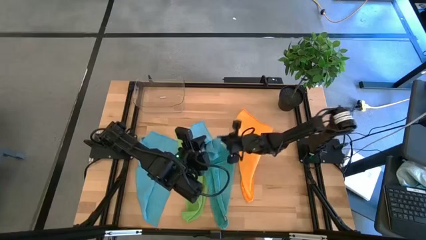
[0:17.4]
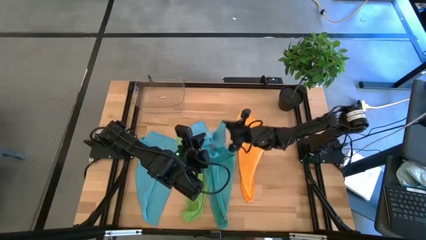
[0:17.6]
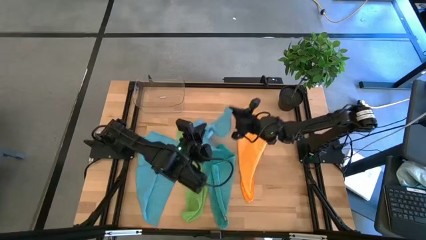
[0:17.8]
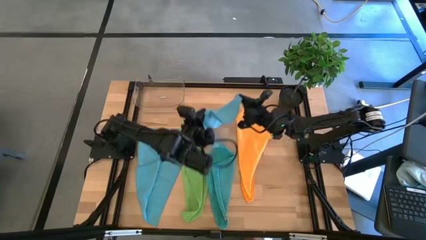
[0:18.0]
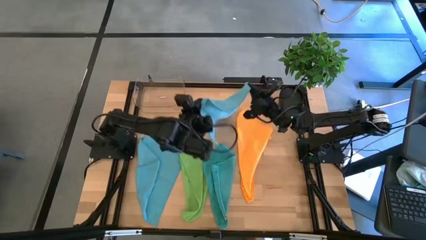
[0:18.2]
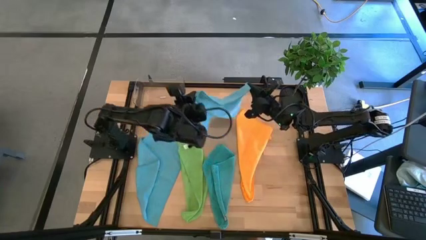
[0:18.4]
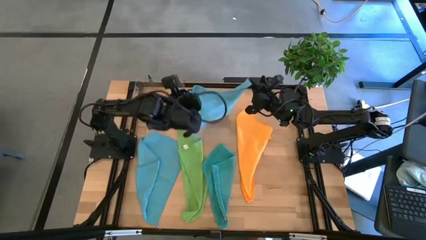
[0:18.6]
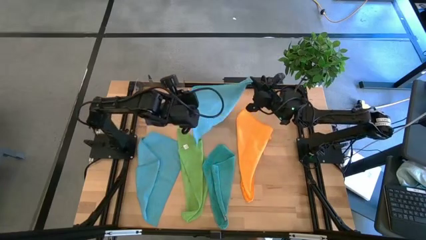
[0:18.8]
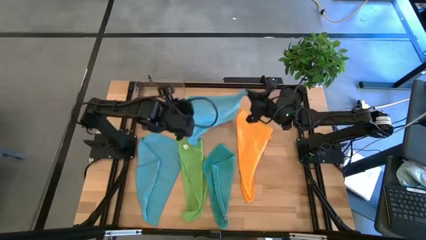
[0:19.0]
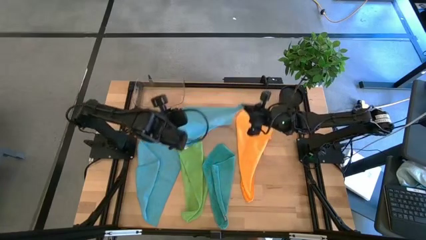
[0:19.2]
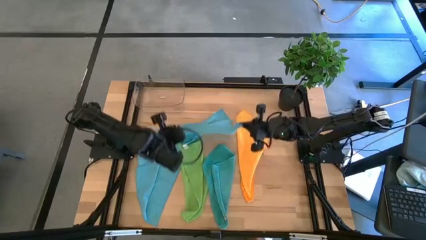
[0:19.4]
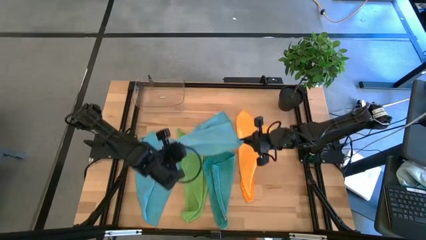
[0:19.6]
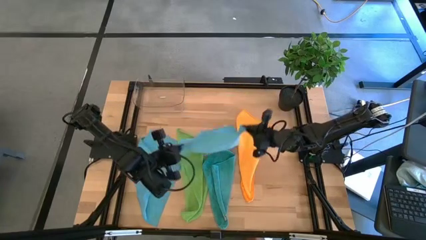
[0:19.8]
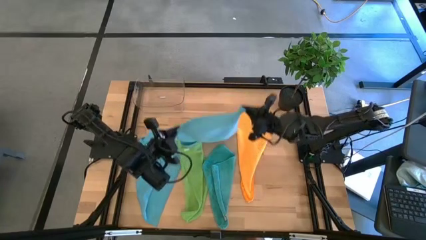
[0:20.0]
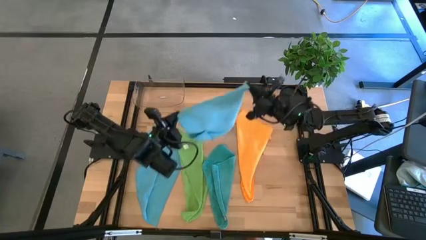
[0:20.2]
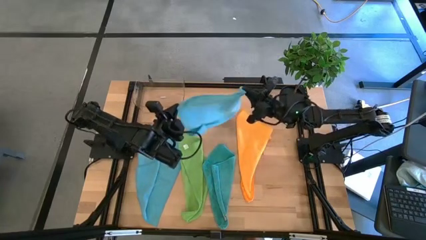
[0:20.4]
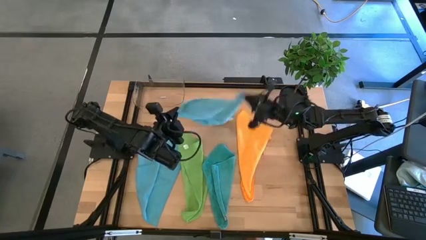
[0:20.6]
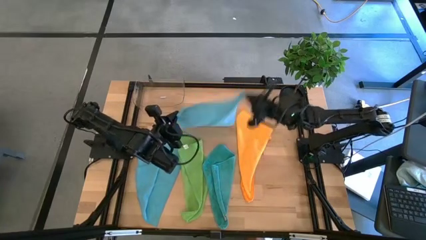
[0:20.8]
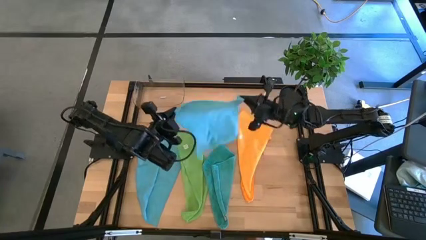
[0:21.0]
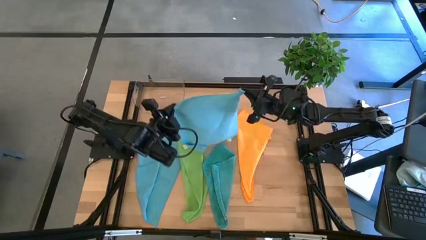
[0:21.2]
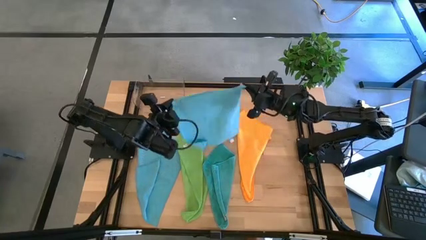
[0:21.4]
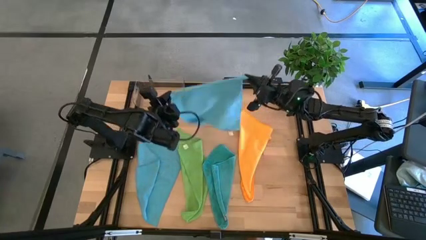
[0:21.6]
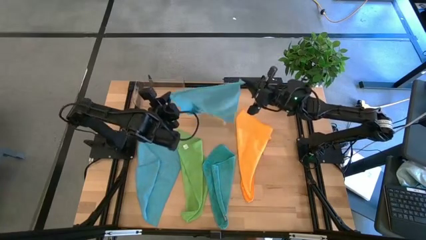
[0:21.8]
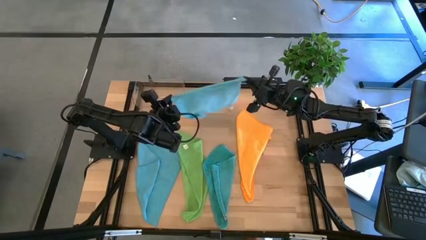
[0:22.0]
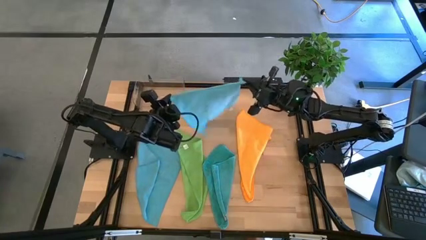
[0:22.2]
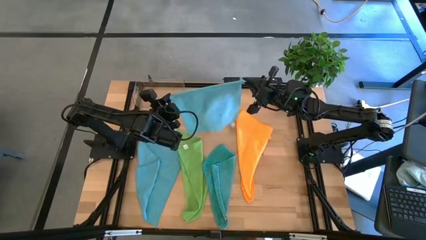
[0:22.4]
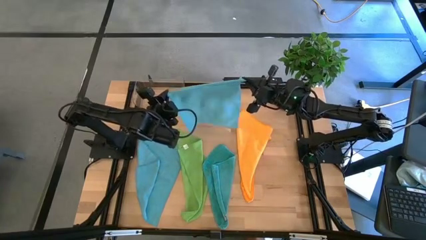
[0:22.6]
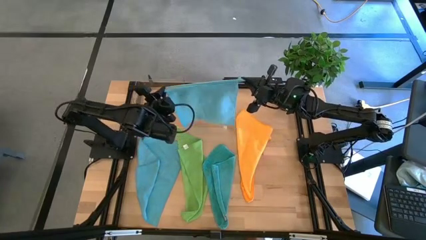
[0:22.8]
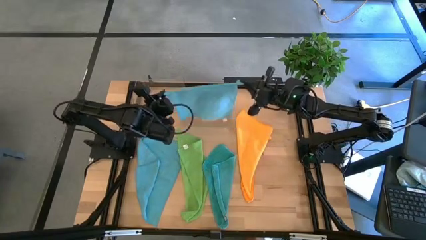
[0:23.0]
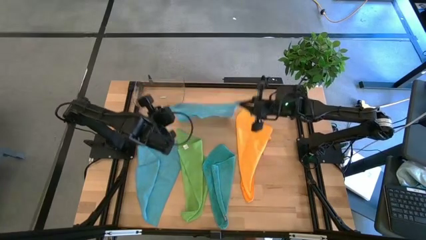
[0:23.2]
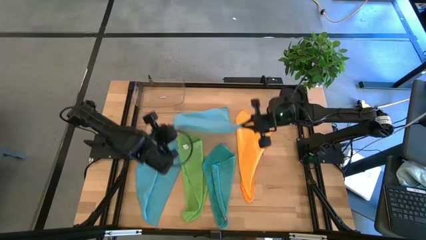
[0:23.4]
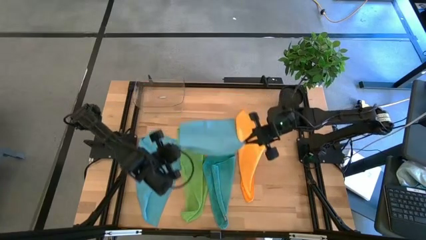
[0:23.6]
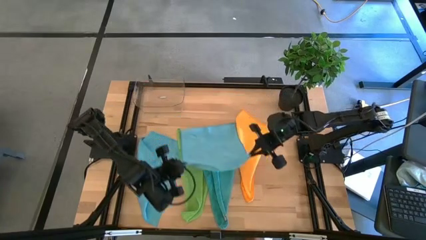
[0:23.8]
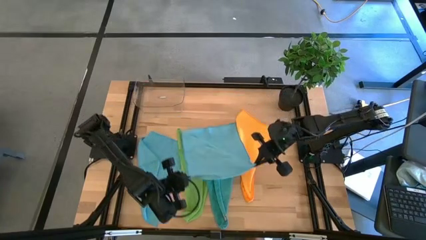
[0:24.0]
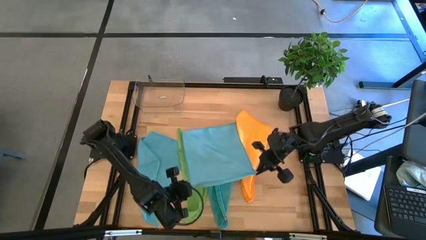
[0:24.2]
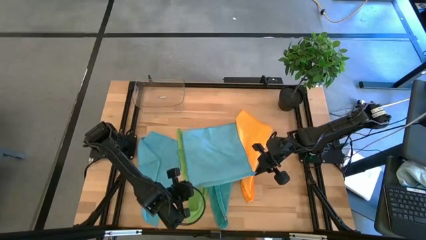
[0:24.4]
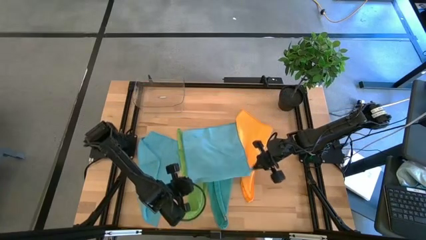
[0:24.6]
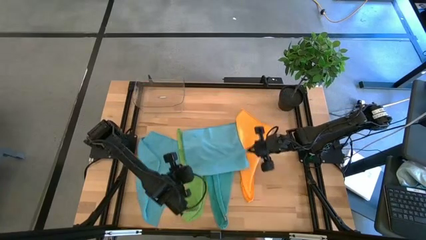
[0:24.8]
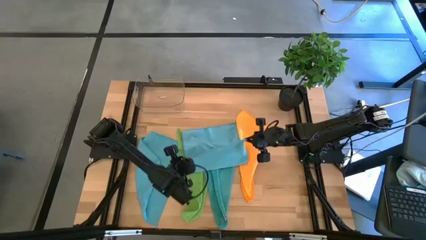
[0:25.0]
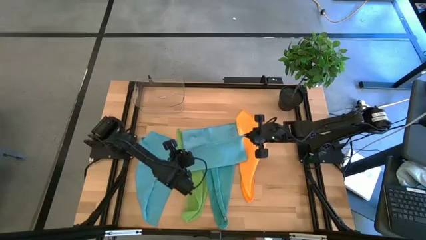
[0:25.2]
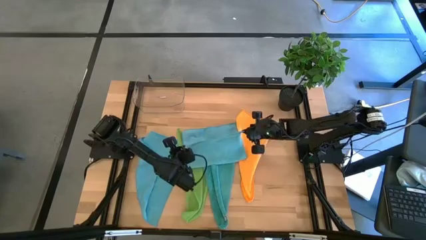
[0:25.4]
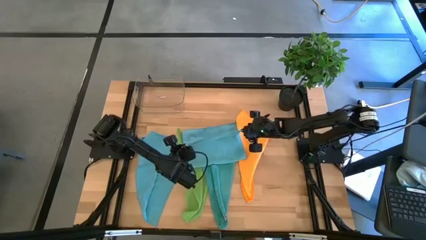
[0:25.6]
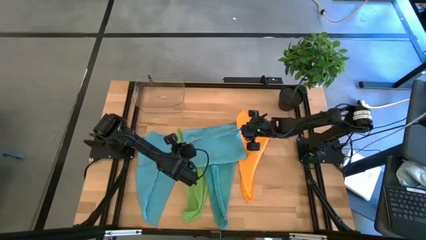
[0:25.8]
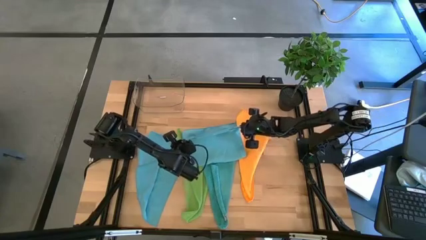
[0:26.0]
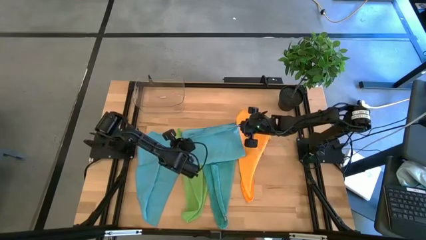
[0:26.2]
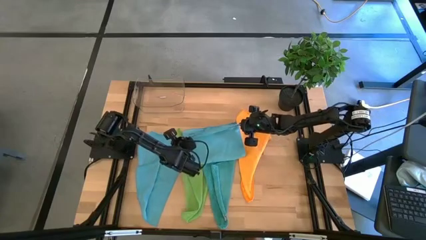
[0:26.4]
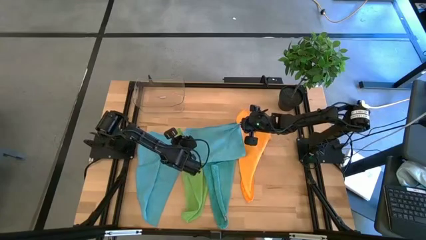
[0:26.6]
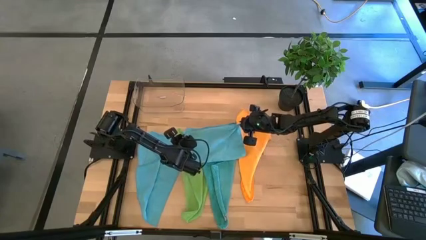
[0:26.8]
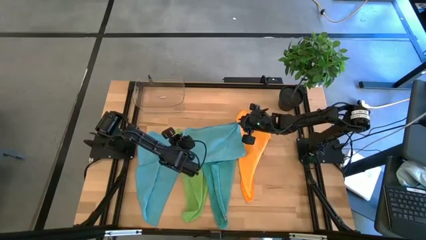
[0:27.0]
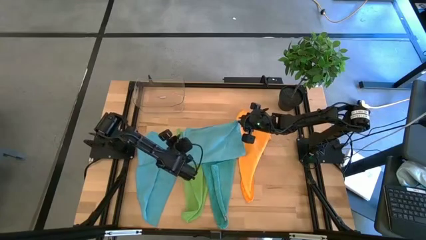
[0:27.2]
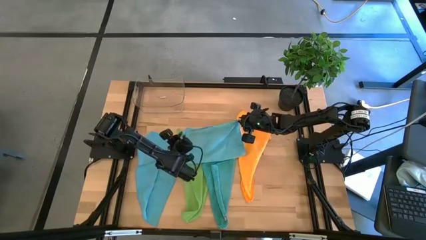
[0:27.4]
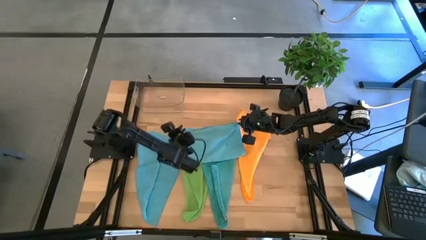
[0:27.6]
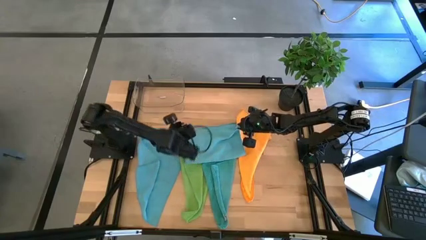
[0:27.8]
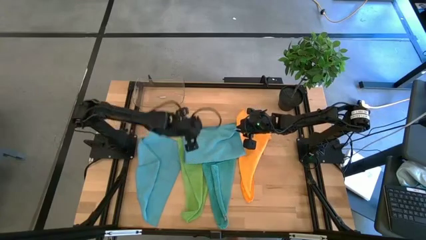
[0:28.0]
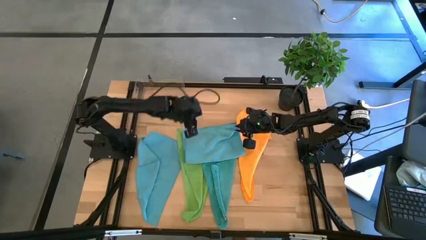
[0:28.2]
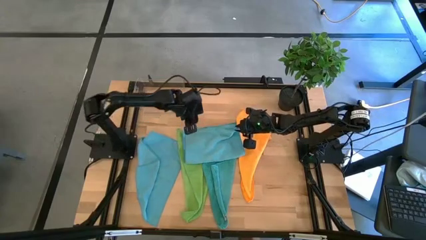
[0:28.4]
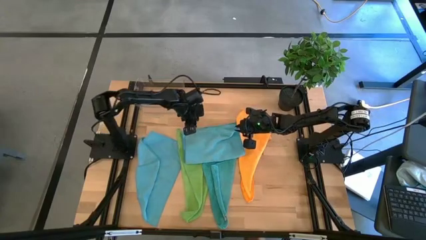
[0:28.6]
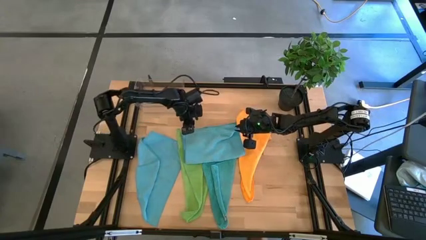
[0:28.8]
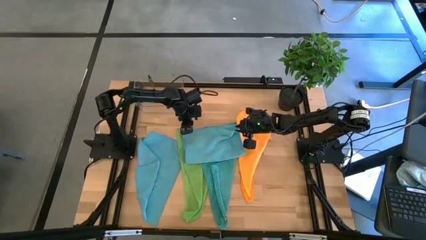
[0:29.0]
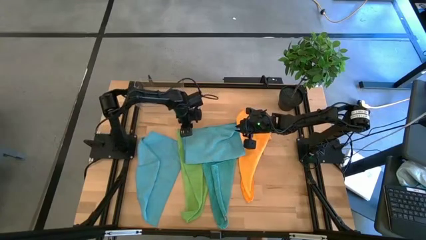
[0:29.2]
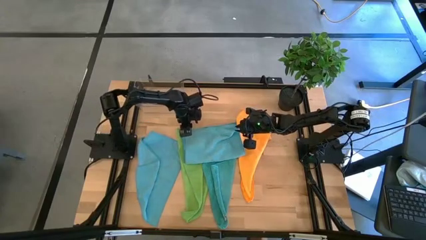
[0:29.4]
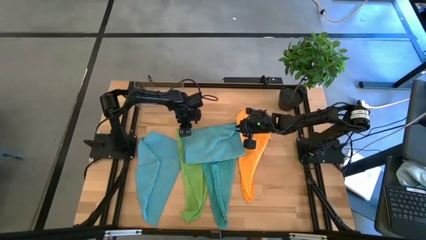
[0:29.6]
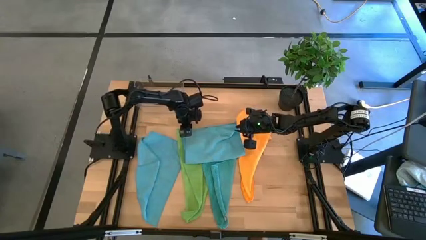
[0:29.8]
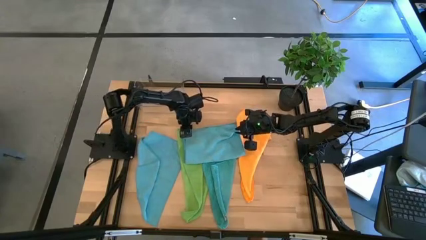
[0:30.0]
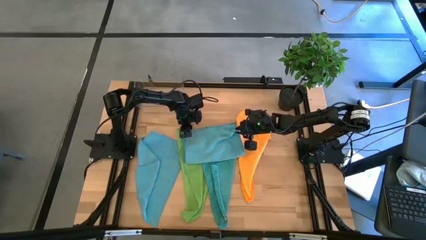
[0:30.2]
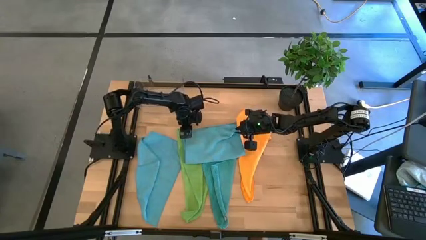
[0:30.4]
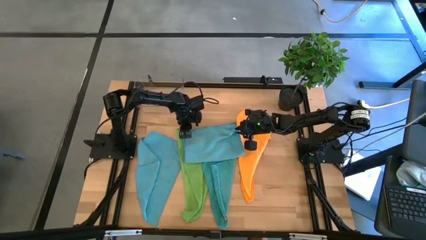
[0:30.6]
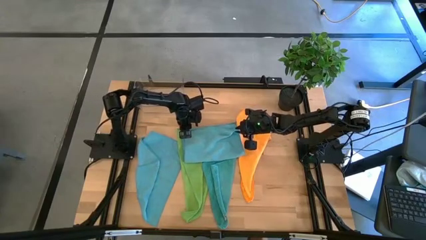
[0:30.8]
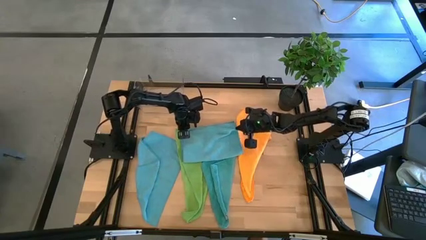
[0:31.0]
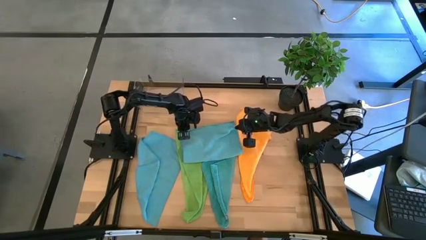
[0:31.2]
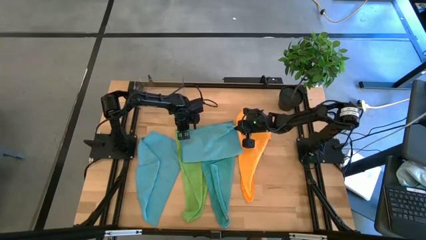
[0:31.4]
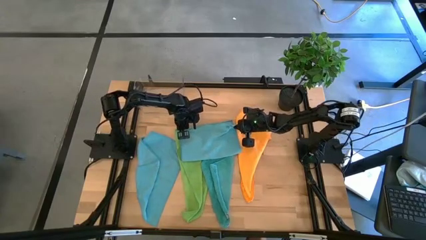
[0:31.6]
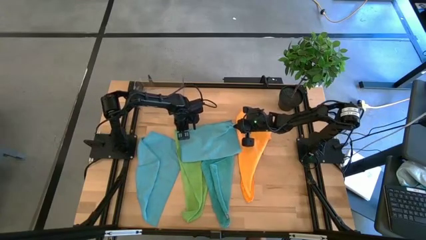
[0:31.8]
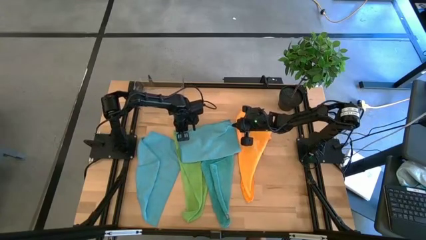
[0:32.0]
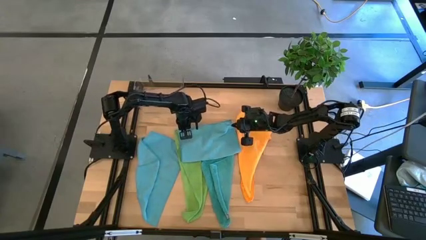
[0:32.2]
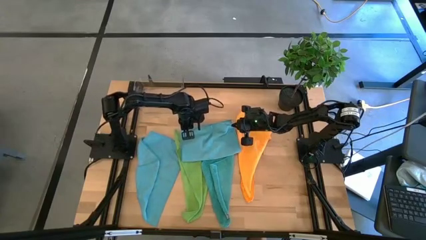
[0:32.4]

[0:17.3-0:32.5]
Task: Fold microfiber towels
Fold the light blue microfiber cloth
